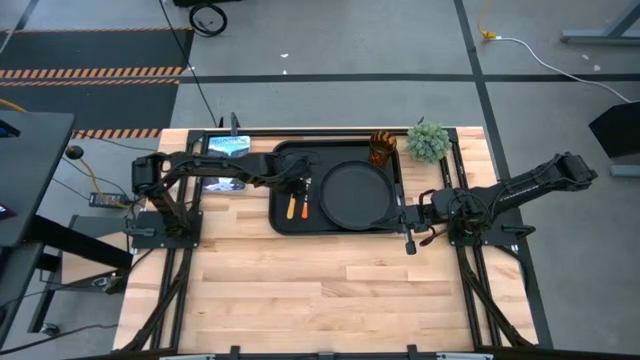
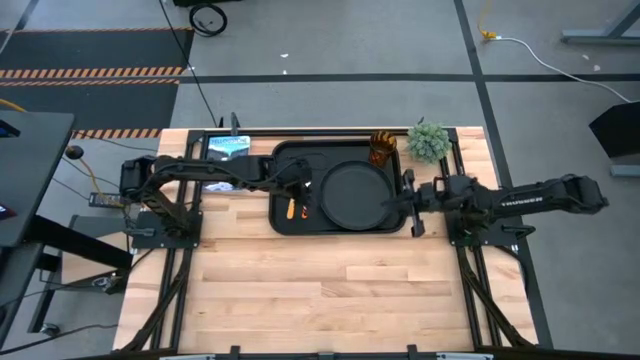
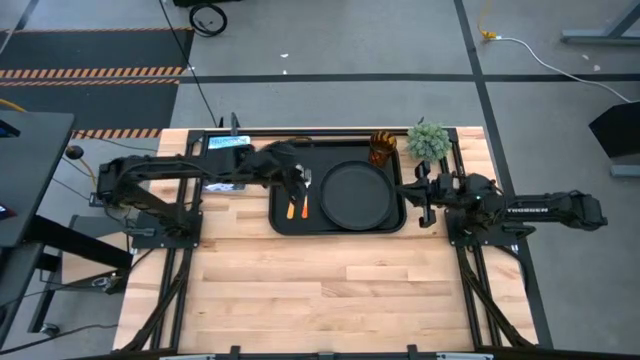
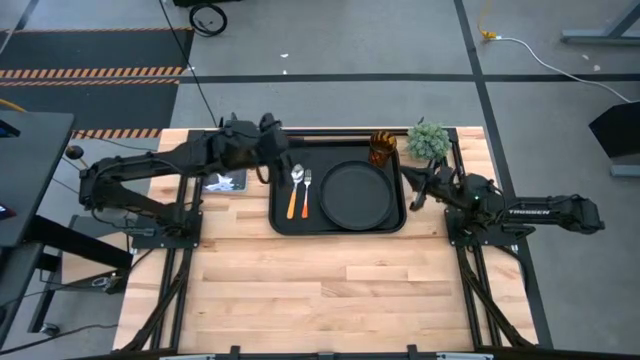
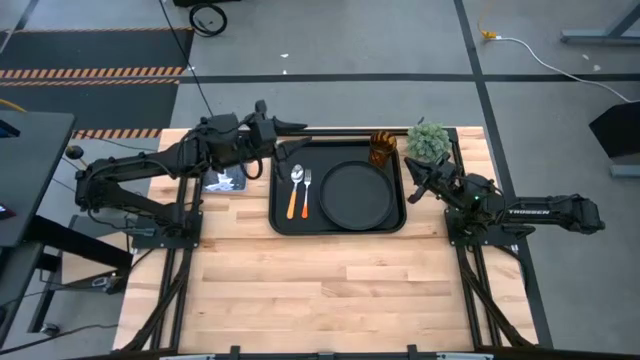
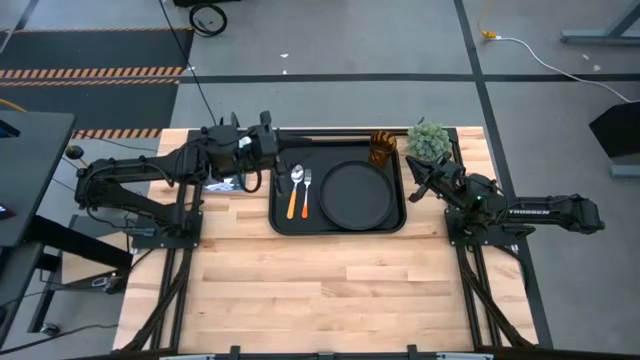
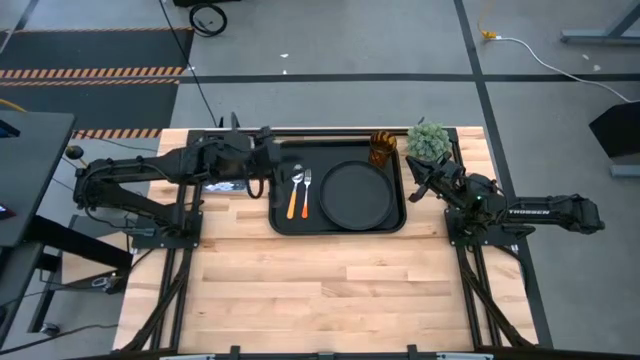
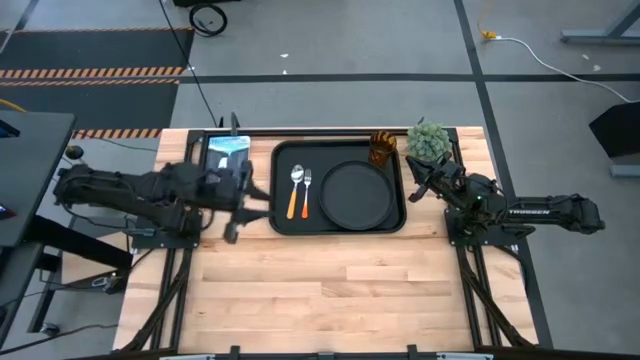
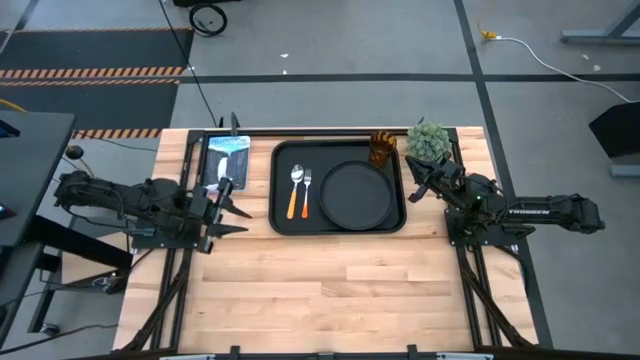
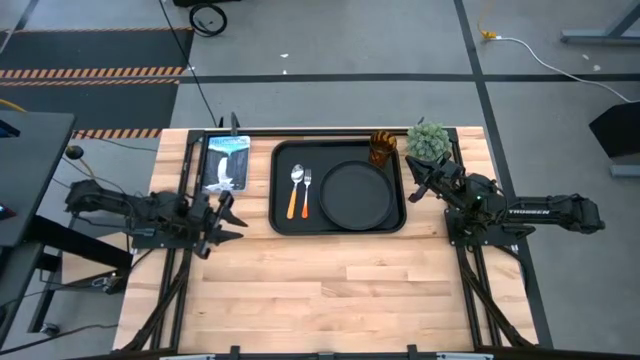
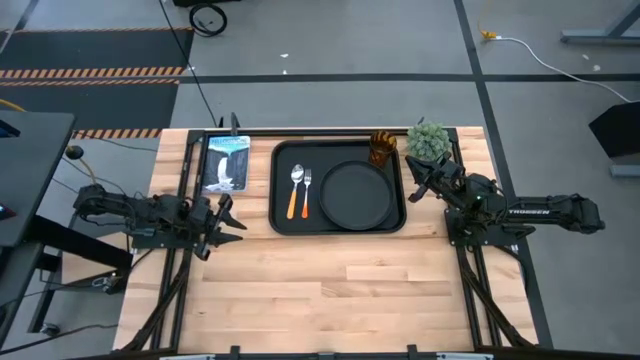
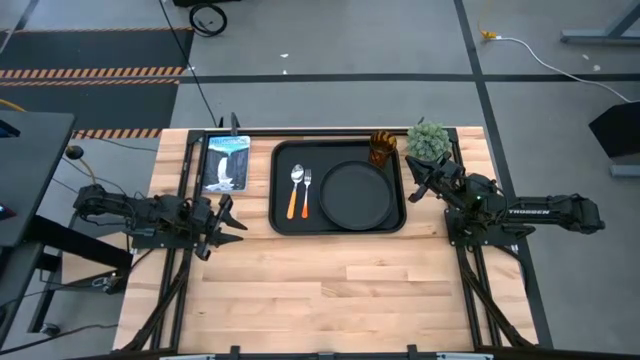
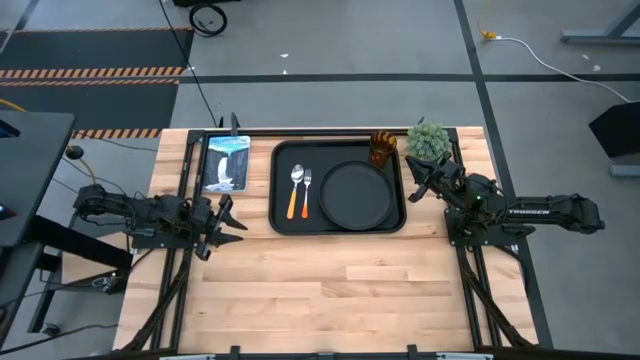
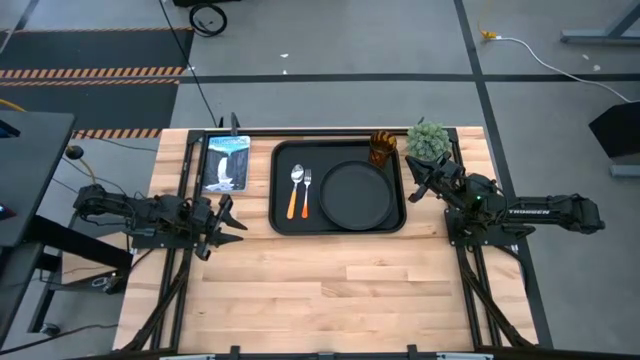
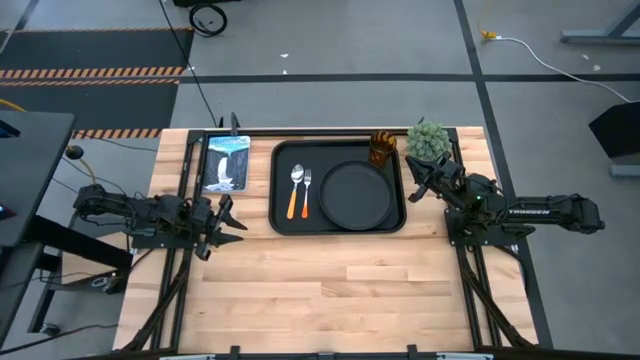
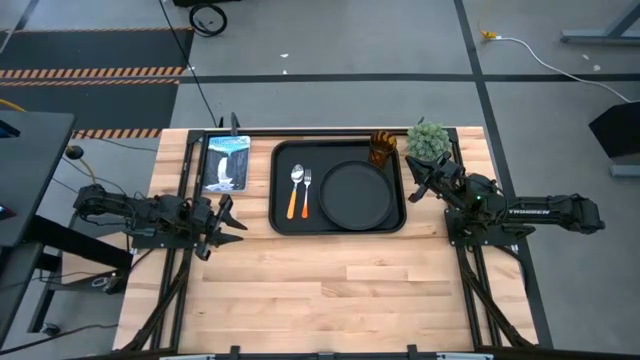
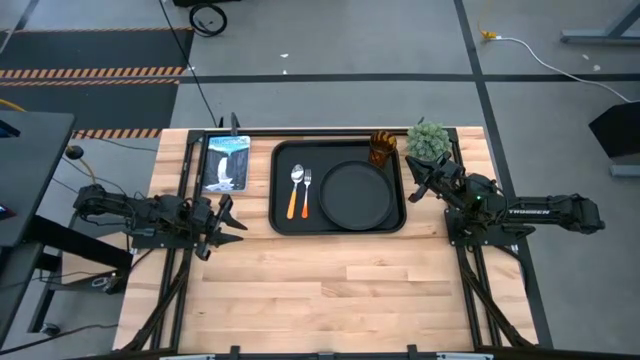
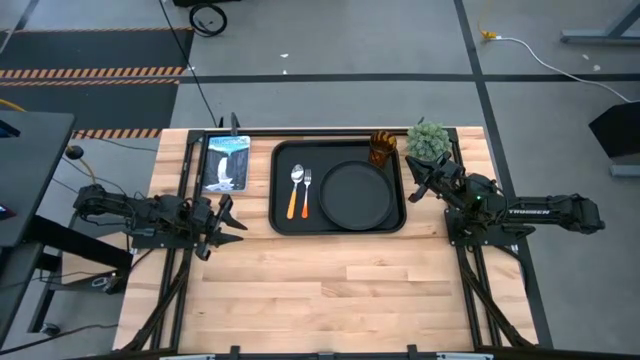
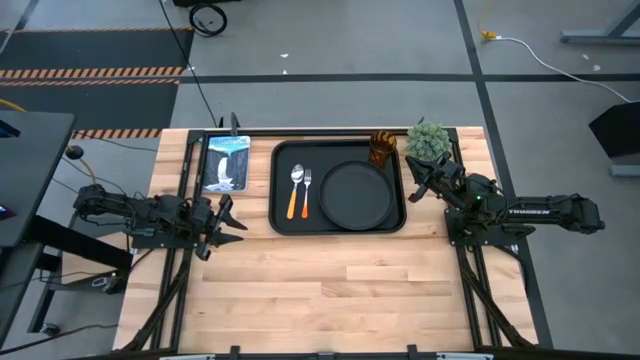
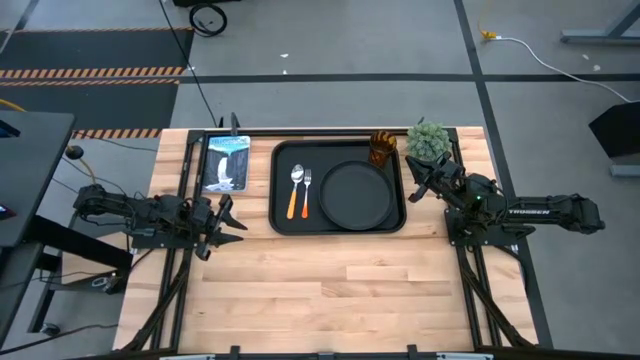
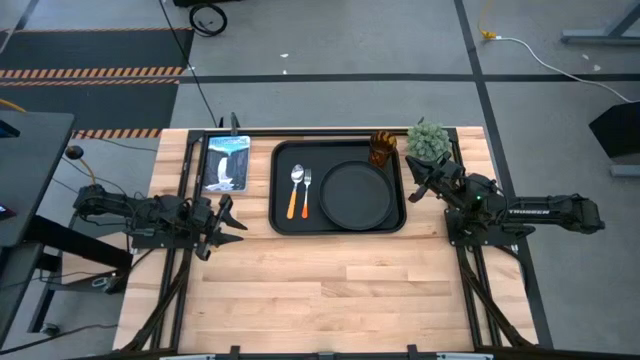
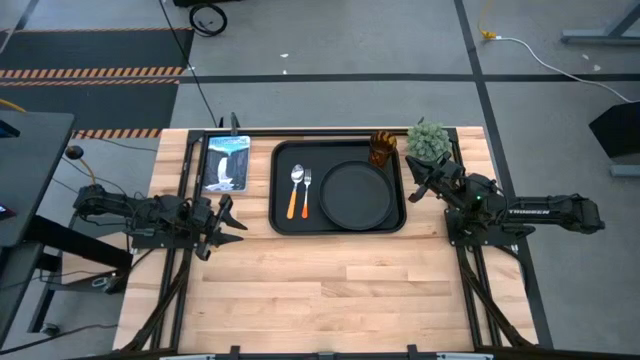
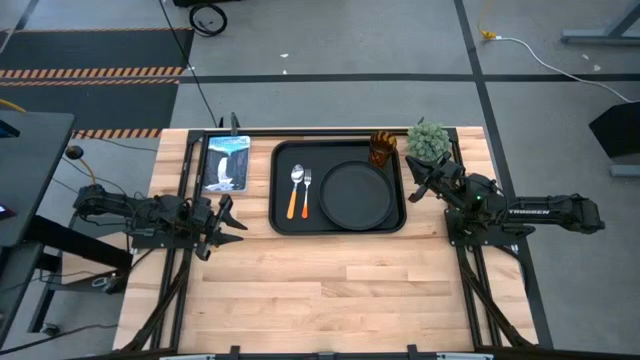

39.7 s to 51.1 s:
Task: Pick and place plate/cup/fork/spoon on tray
Return to Home Position

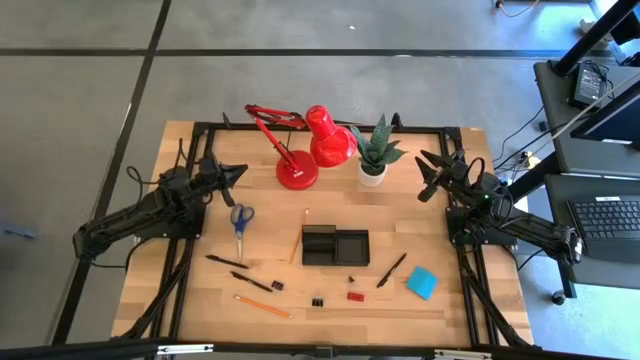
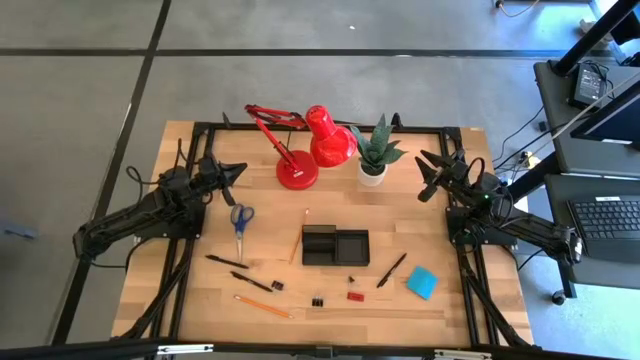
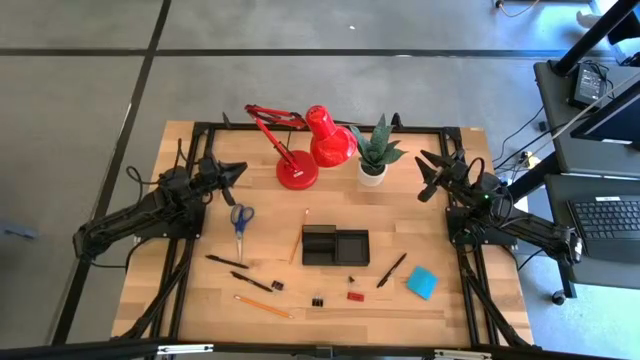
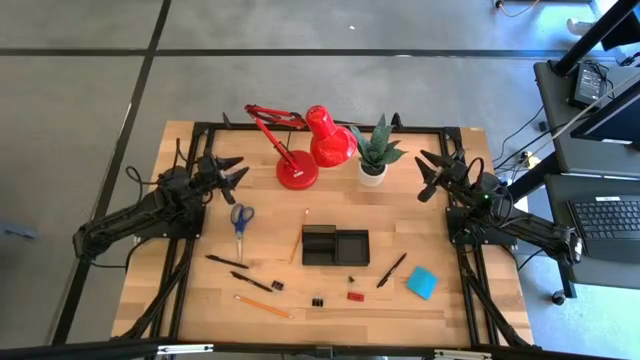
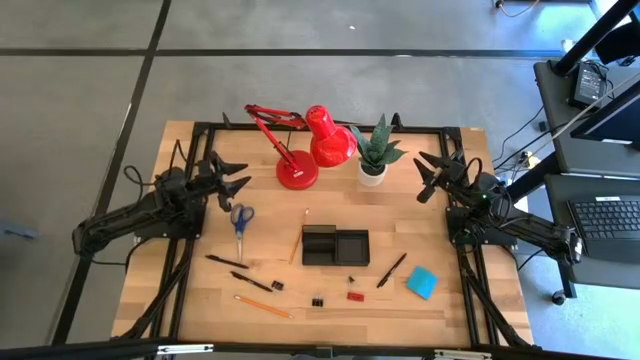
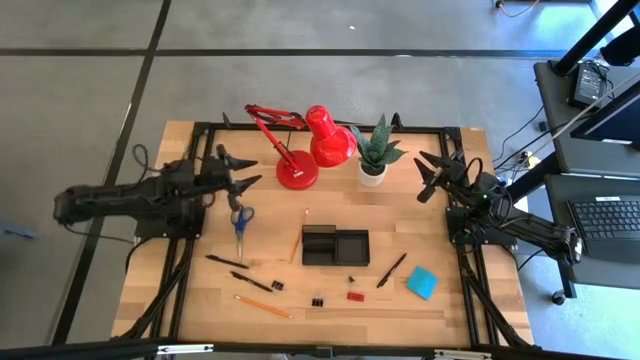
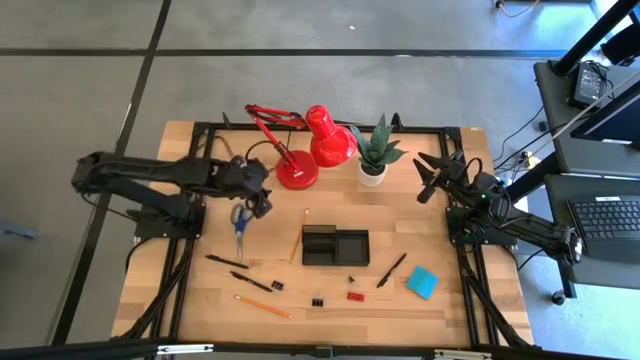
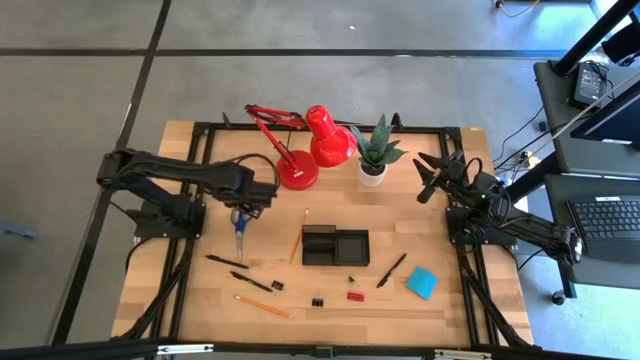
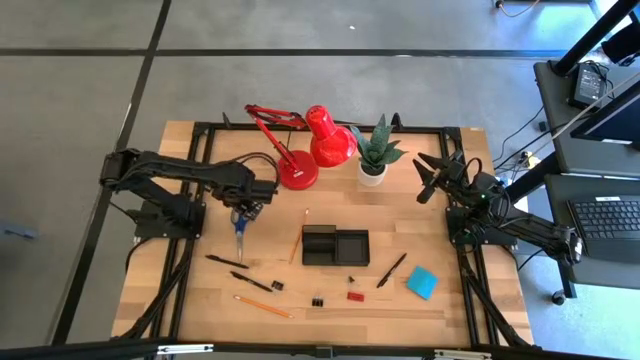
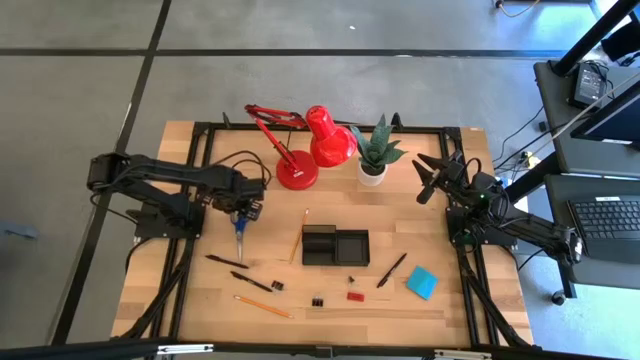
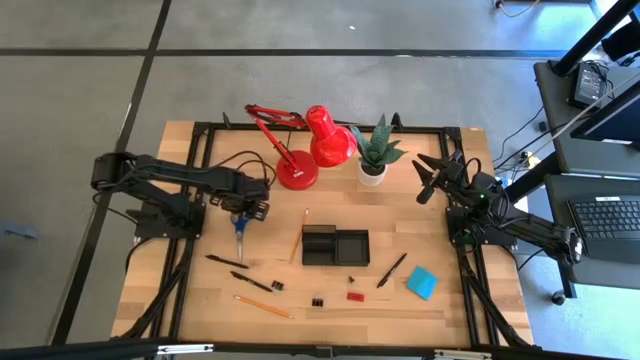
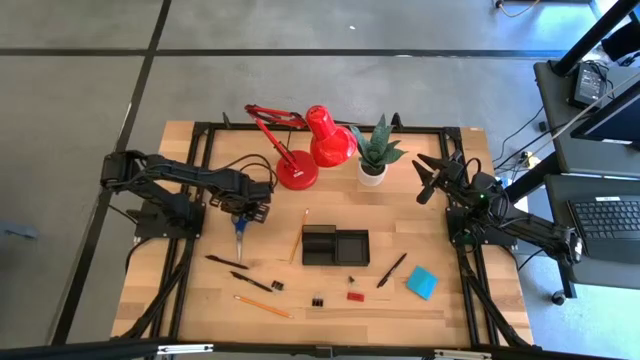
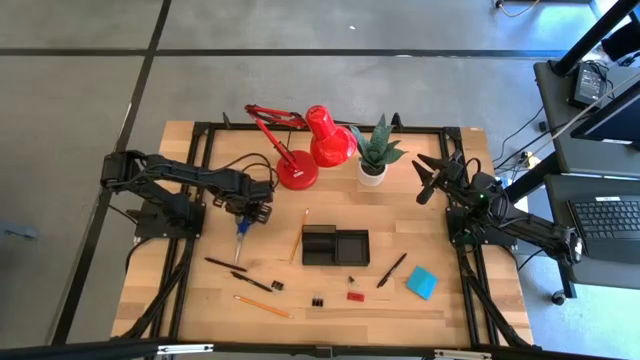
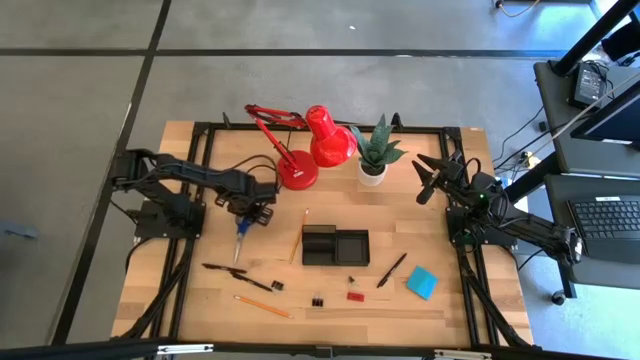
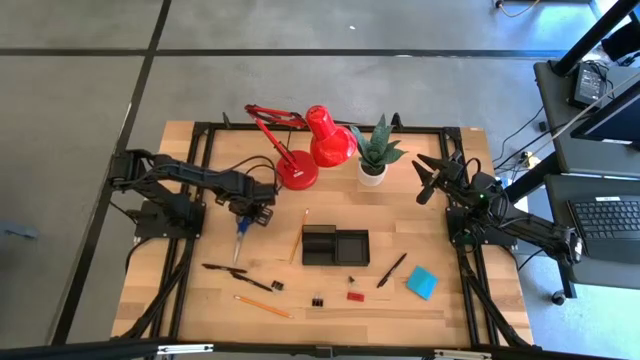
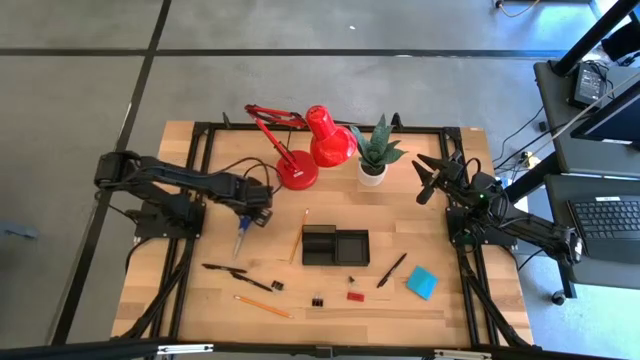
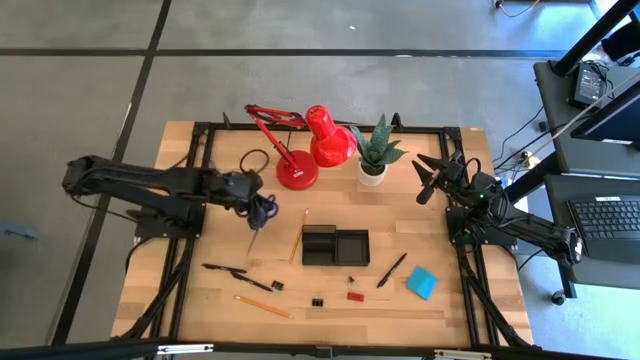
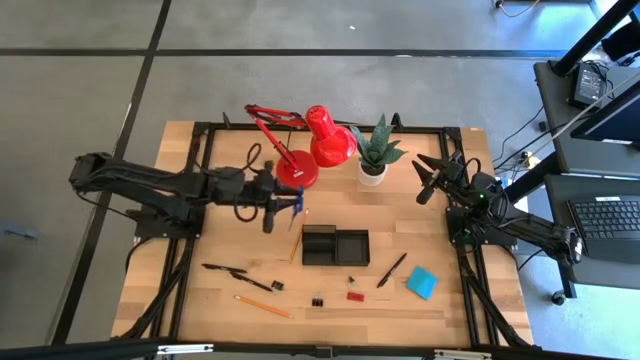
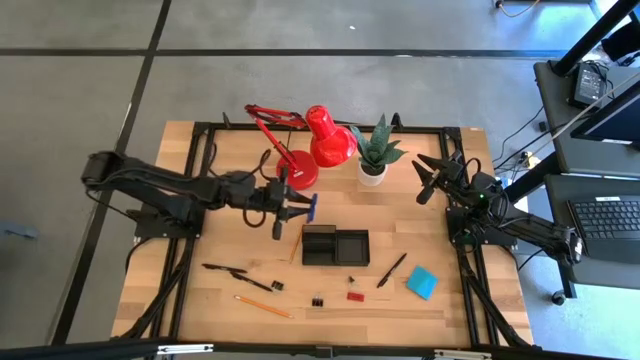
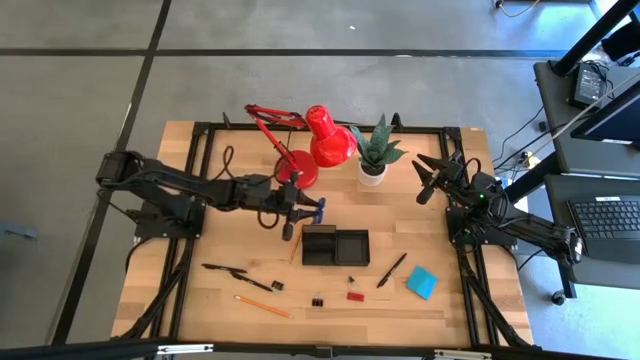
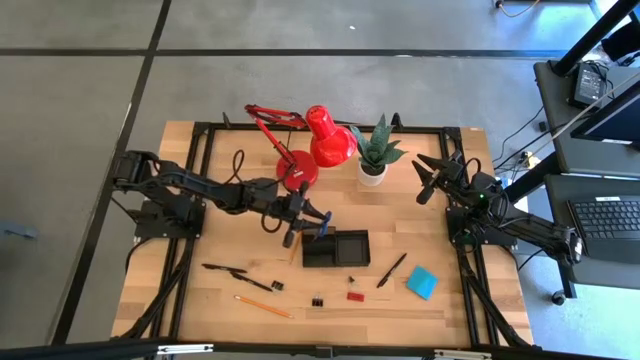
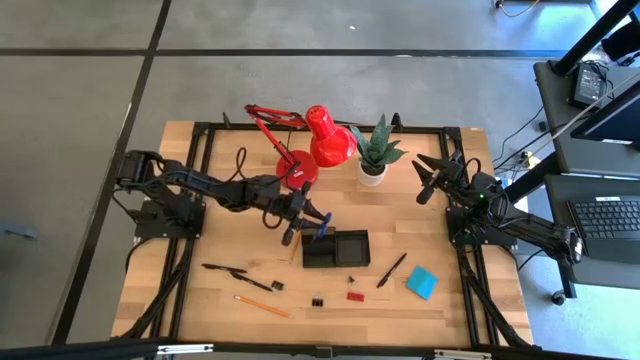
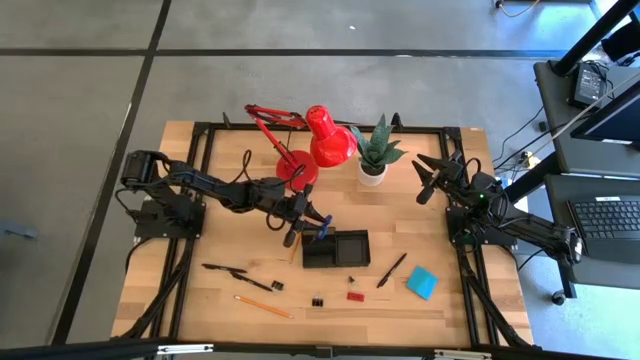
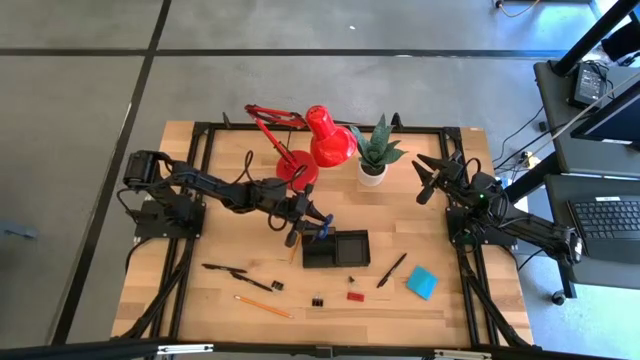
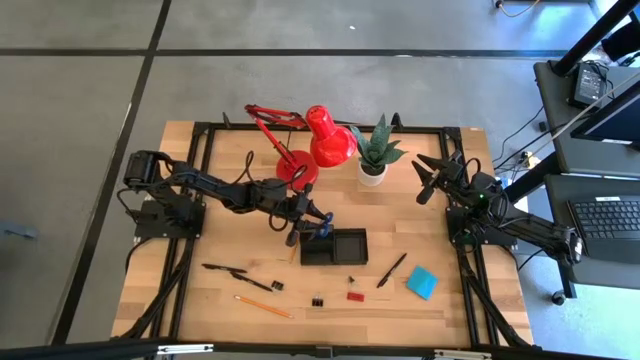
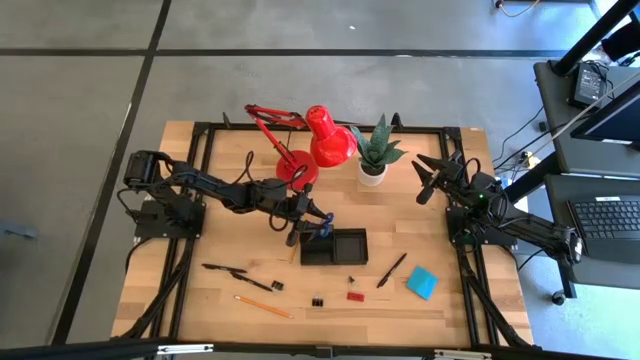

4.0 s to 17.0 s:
Task: Pick and place office supplies into organizer
Put the blue scissors into the black desk organizer
